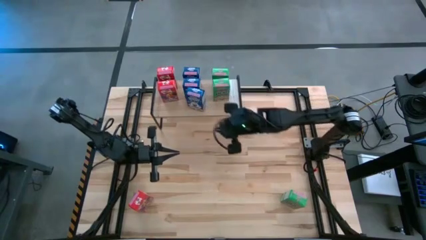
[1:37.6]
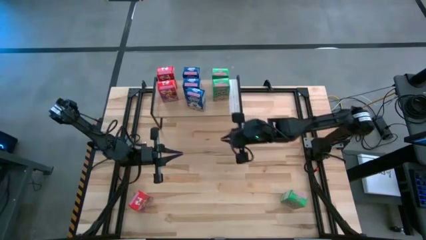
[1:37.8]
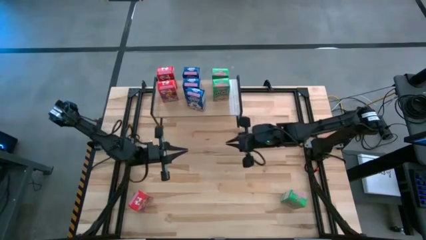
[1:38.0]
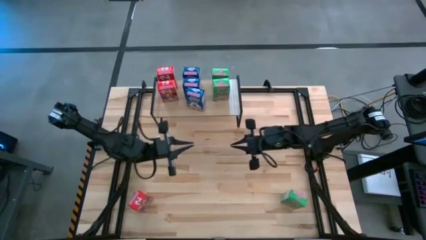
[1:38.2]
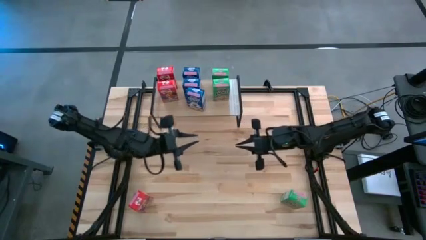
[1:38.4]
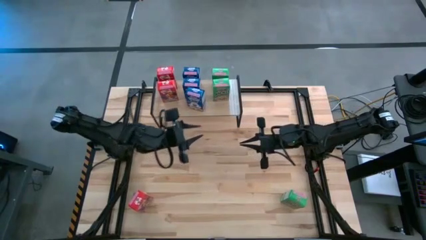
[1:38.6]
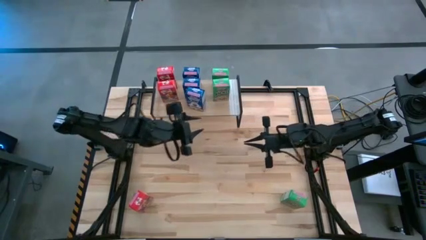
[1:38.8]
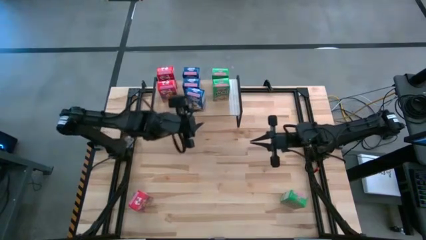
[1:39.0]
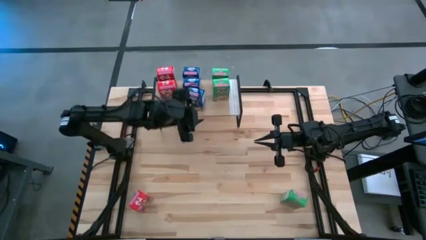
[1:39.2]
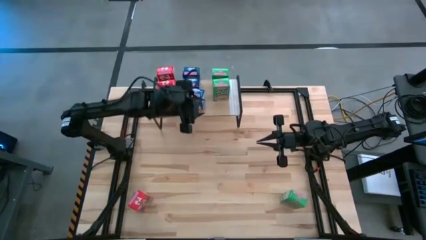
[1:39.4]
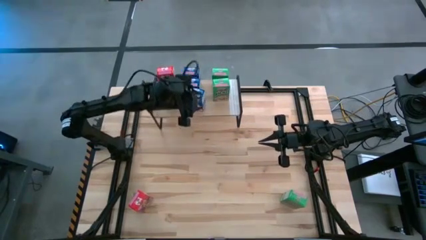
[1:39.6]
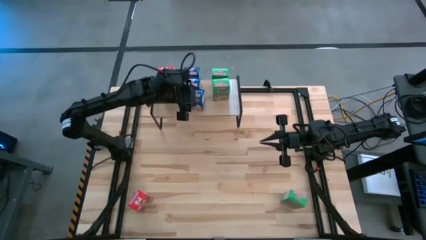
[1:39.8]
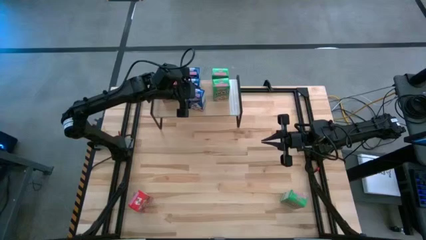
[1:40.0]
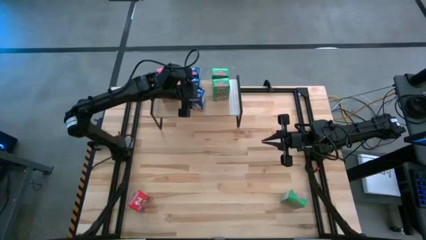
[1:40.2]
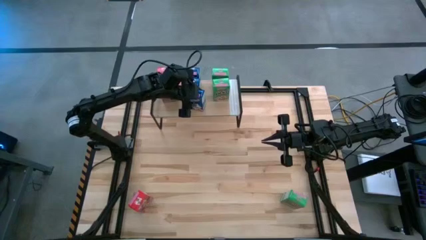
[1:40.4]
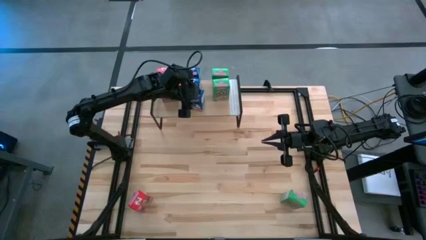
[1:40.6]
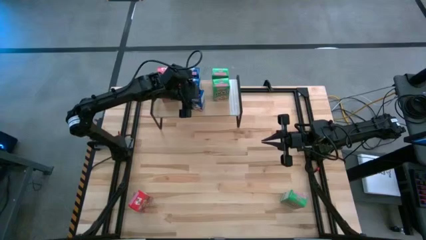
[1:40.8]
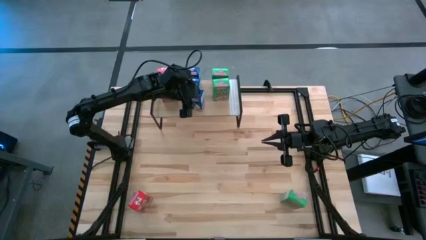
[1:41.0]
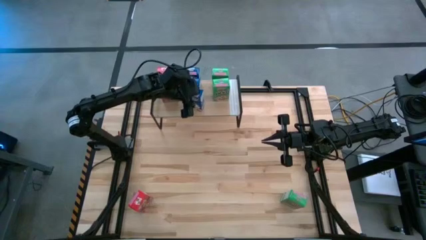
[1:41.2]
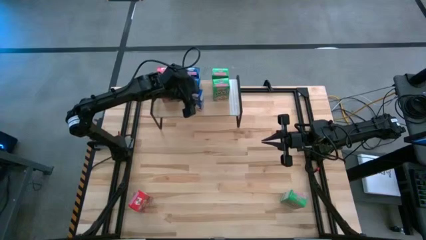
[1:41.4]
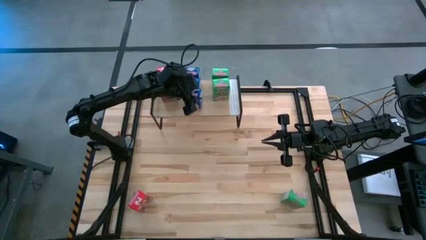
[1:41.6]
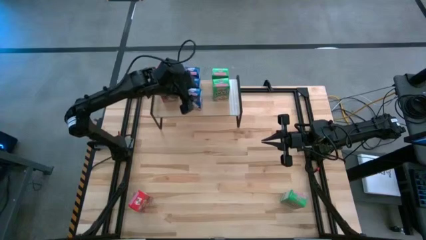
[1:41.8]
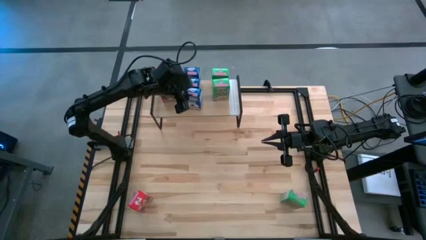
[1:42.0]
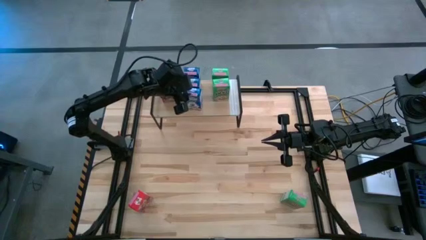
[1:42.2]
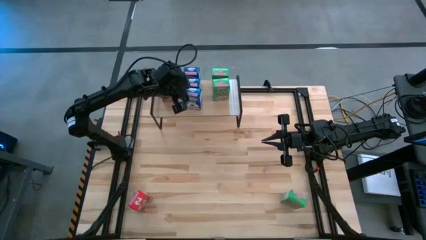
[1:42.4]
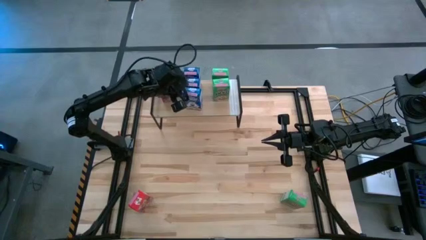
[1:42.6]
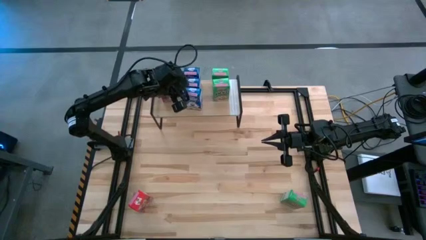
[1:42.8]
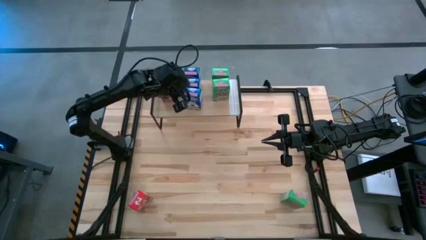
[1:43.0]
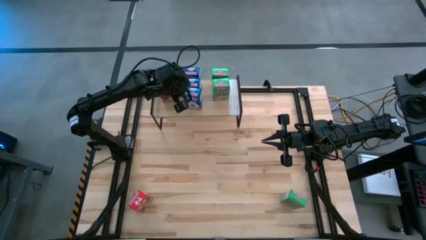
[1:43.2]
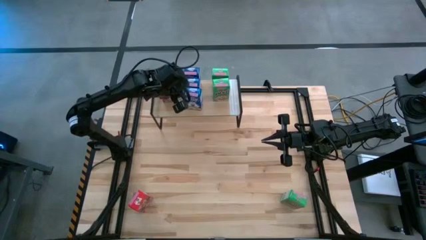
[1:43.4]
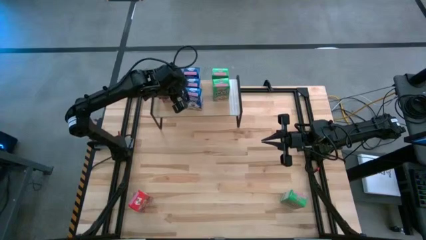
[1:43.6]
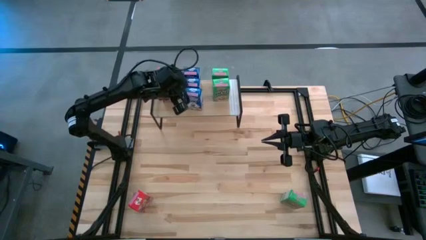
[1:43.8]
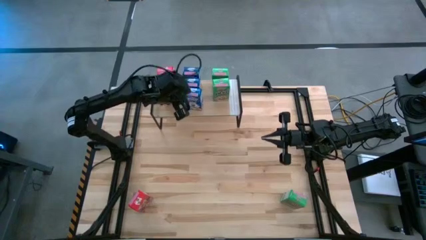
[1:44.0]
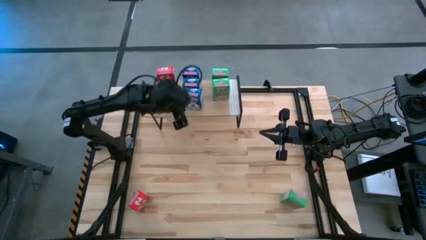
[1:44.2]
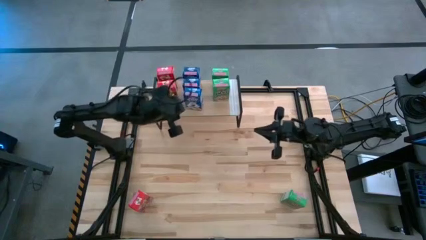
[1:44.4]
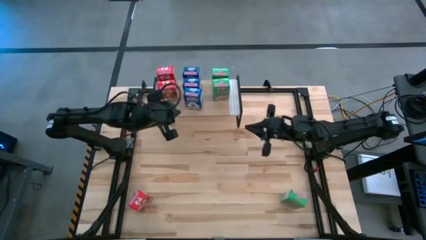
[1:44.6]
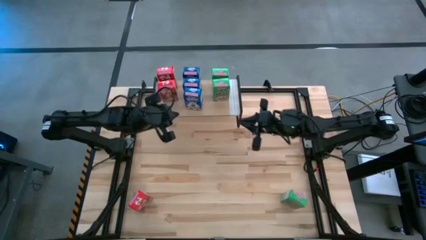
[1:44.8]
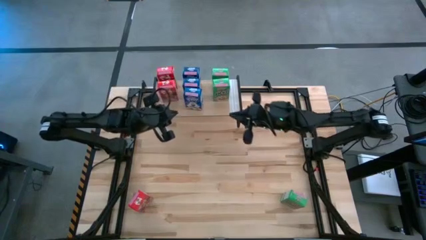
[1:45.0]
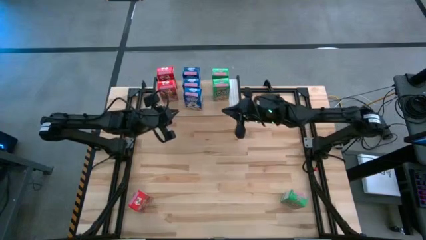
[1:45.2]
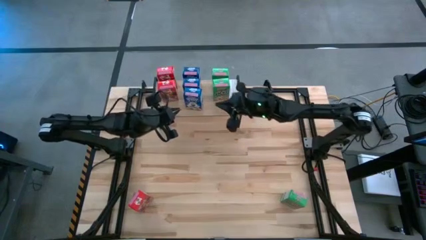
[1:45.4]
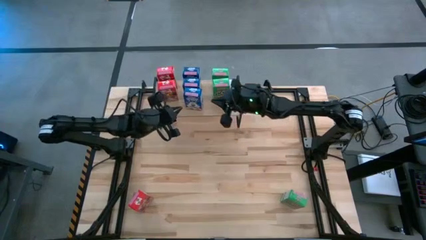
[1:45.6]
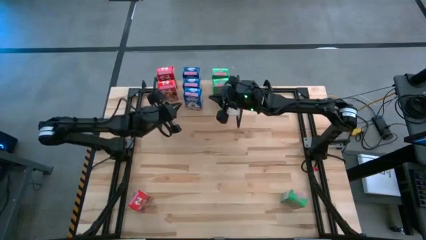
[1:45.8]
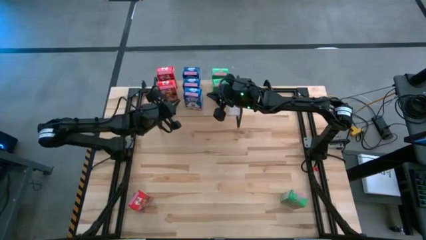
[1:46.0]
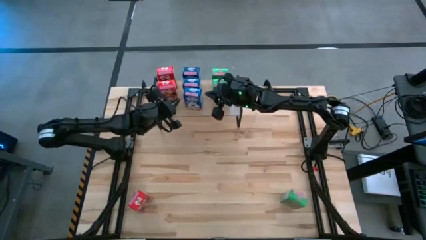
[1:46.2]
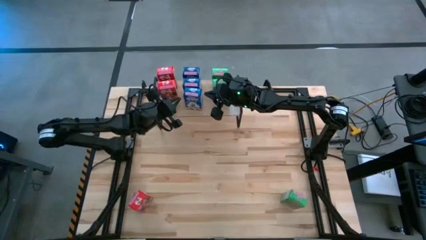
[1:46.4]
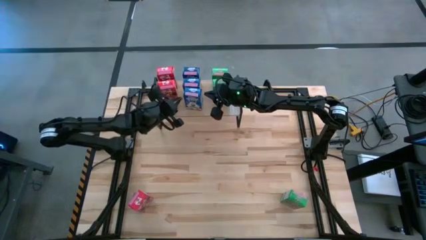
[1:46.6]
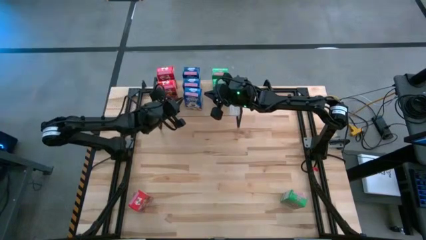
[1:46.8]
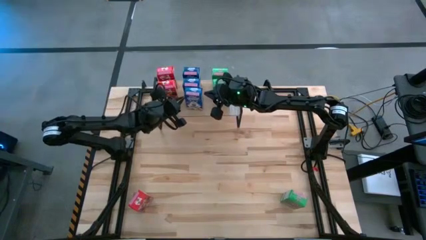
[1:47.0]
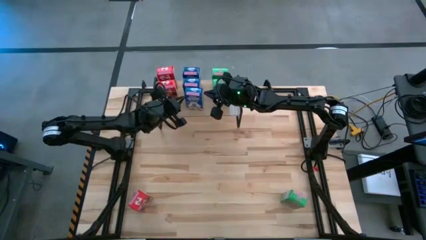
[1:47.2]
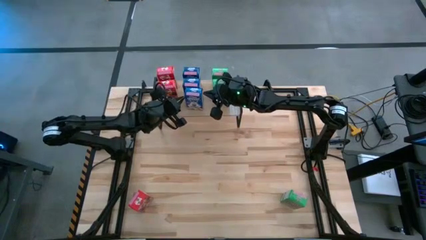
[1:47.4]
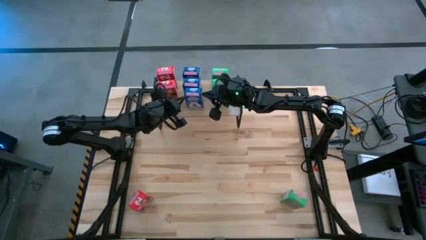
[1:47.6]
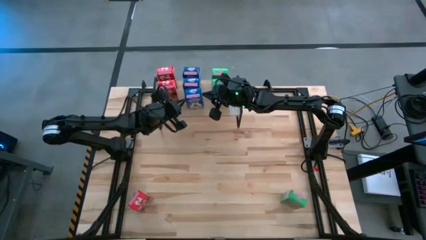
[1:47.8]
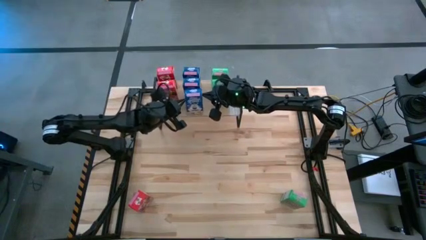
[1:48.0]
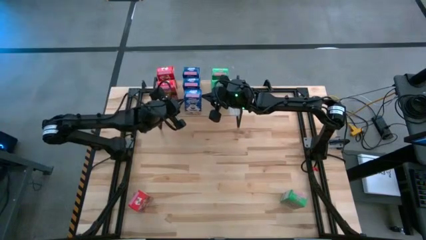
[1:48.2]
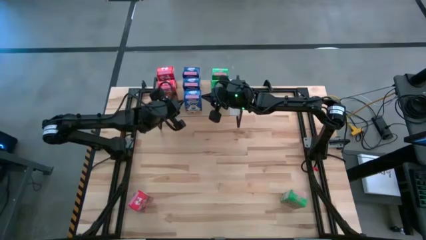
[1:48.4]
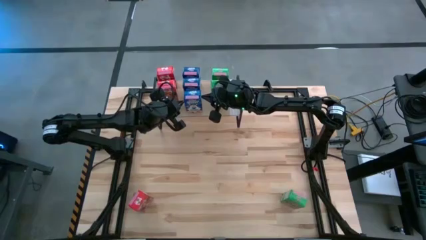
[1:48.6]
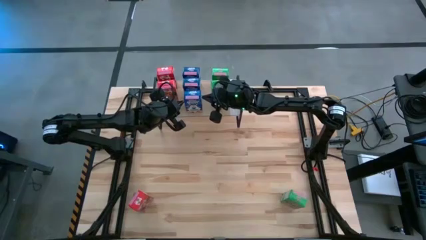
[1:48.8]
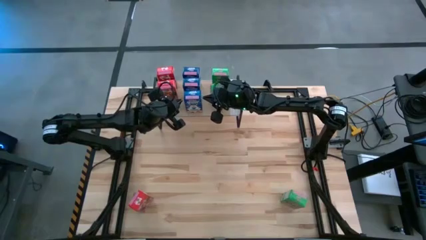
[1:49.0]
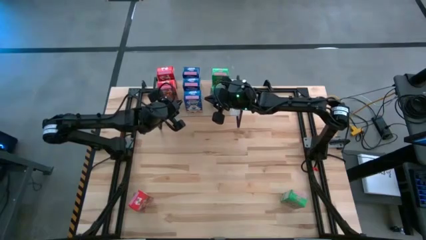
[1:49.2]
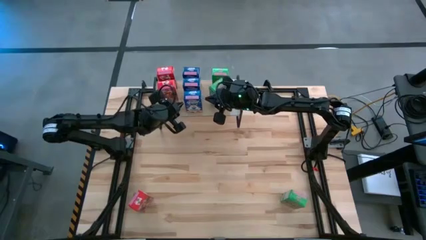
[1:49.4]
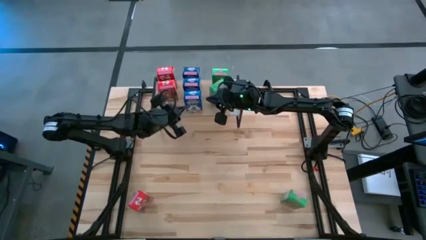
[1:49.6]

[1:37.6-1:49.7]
Task: Stack cereal on shelf
Put the blue cereal box on the shelf aligned with the blue cereal boxes

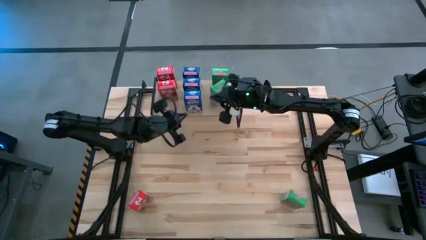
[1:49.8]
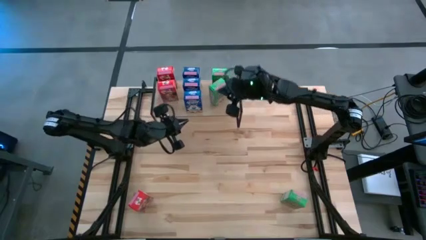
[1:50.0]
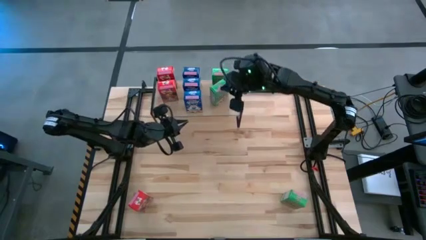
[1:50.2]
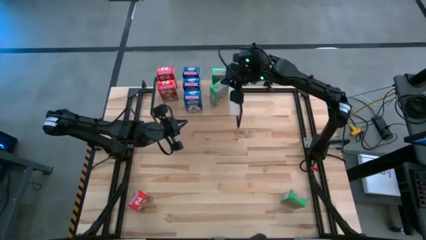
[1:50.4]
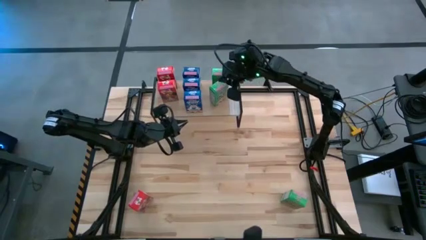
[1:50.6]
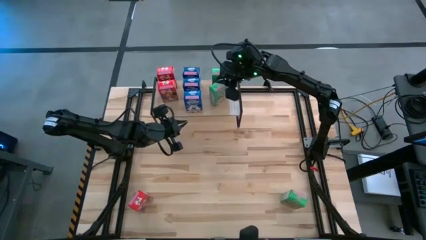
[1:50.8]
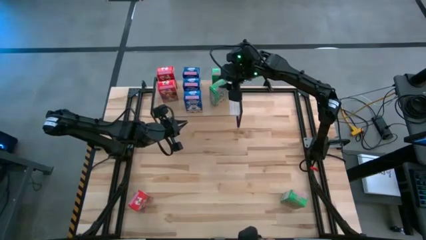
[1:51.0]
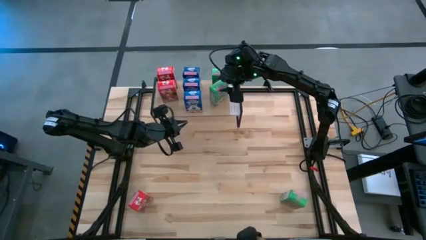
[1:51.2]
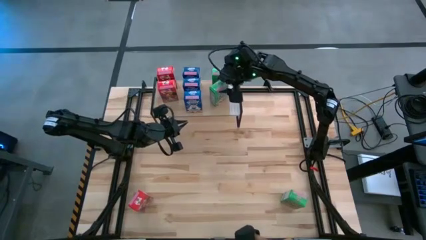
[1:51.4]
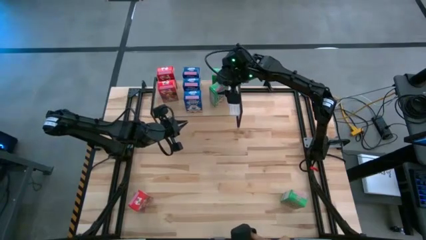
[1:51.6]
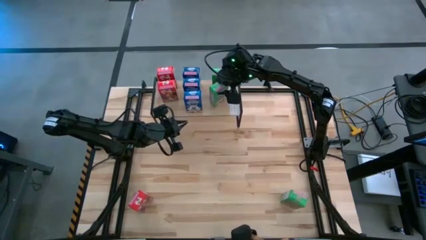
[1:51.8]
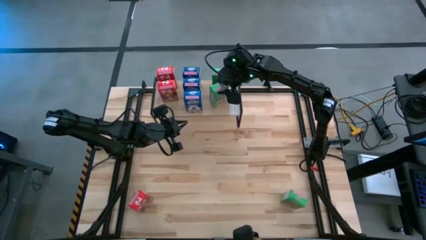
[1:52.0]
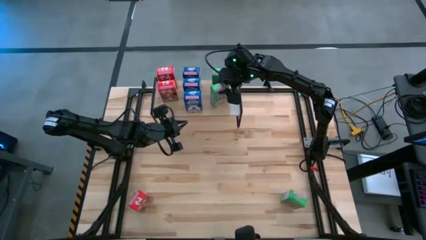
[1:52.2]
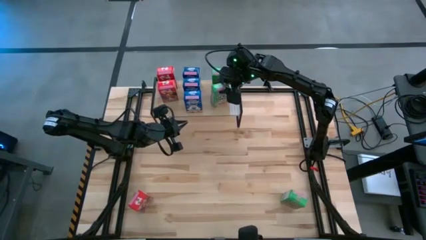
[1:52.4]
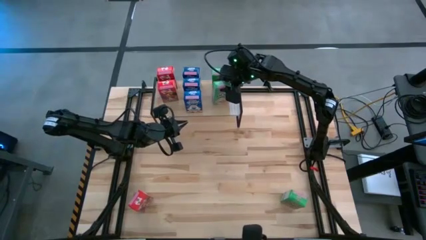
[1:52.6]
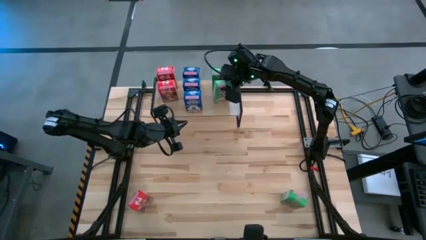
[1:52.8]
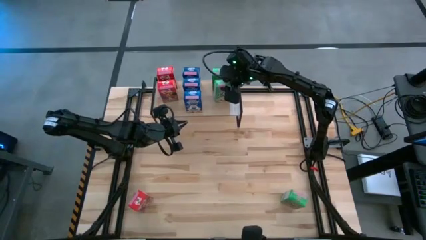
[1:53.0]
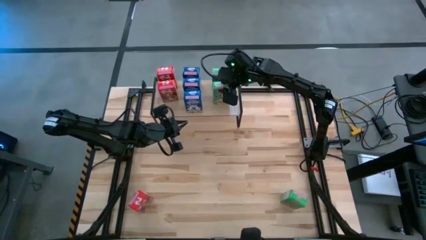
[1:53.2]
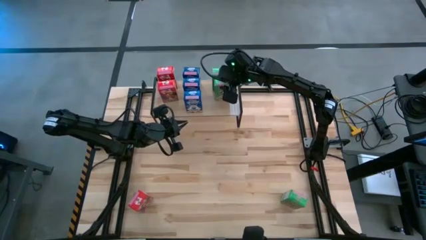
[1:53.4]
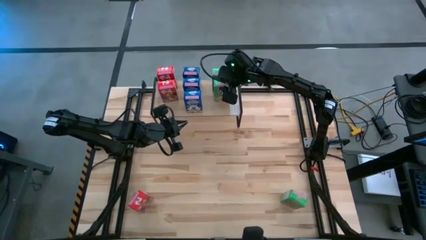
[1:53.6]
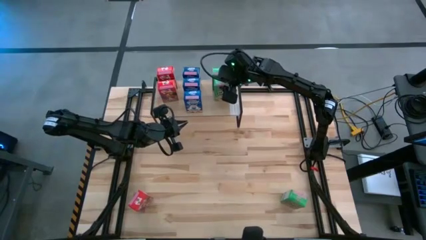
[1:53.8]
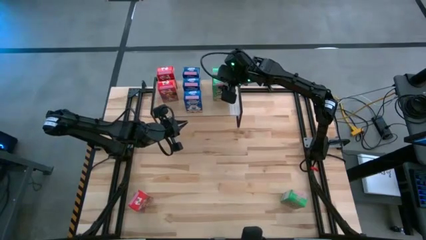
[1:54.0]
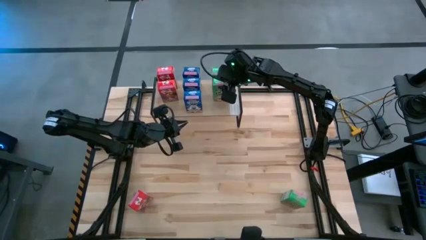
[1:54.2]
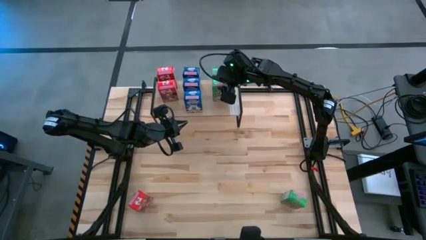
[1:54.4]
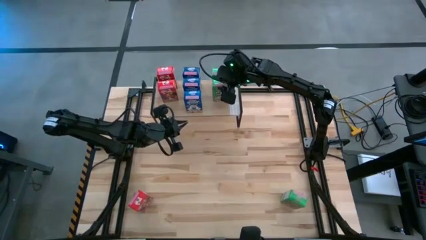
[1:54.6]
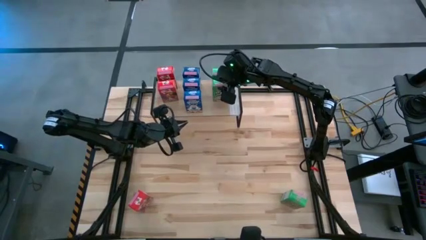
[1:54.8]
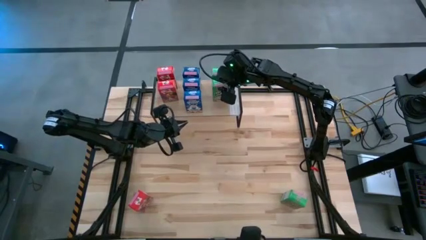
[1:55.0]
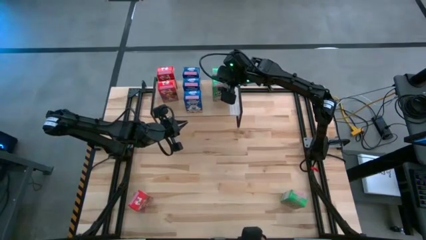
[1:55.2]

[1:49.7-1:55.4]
Adjust the green cereal box on the shelf
